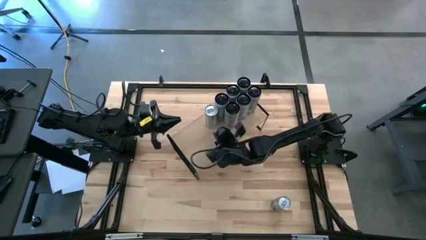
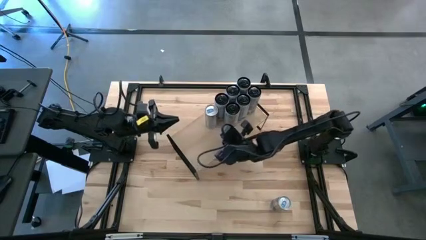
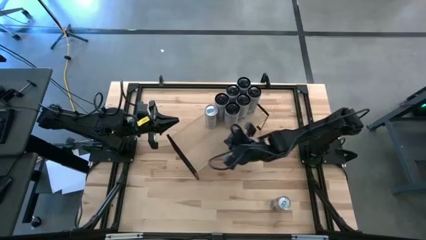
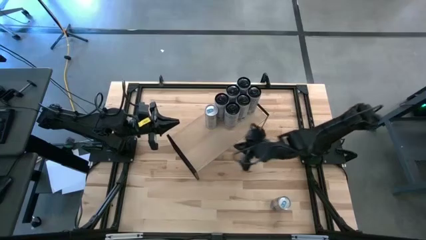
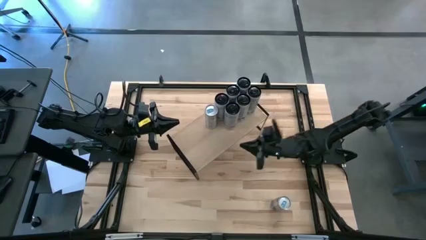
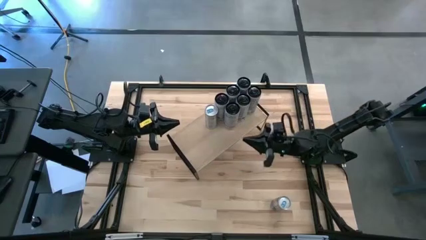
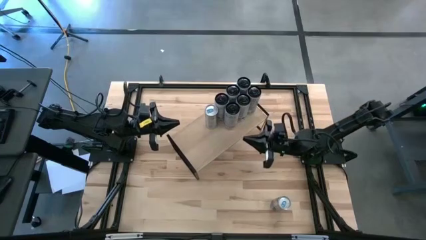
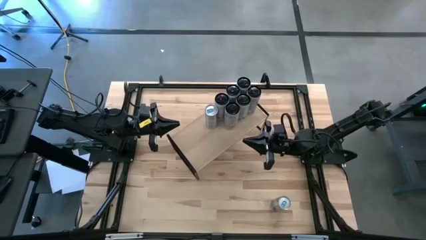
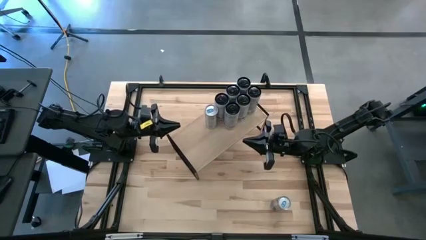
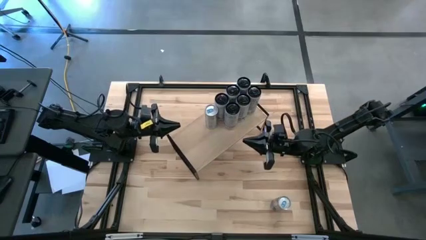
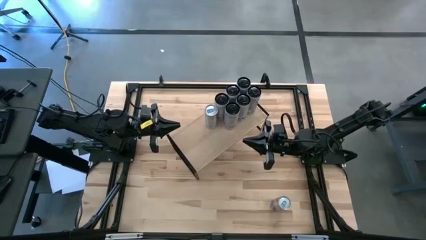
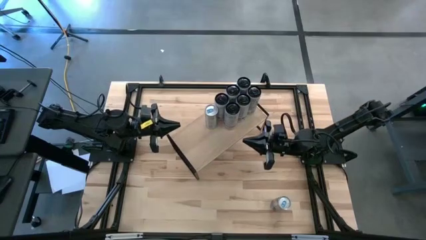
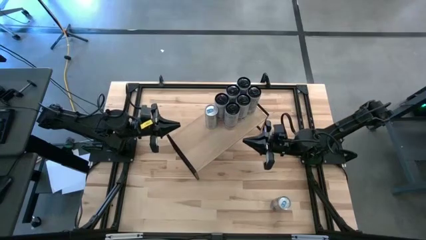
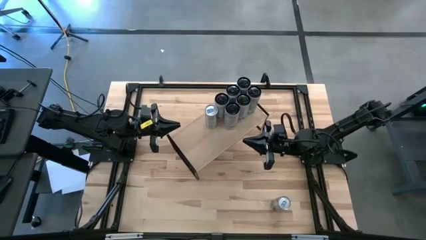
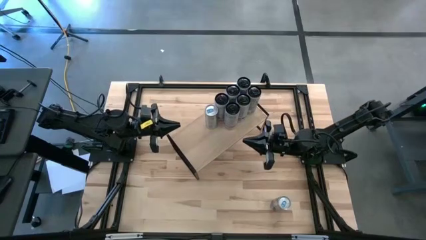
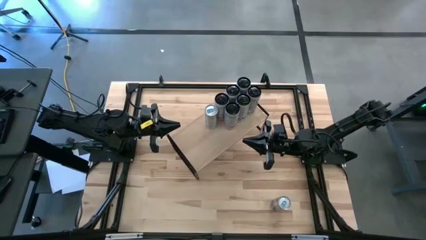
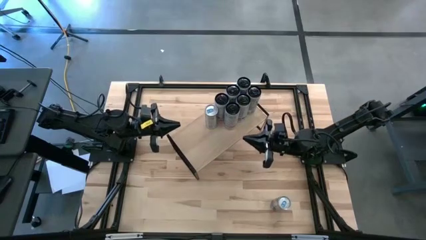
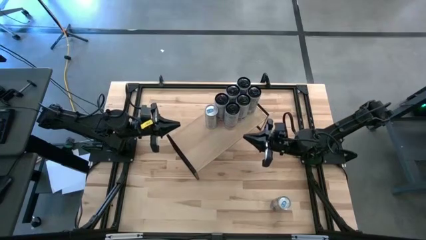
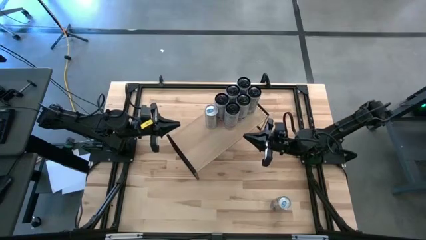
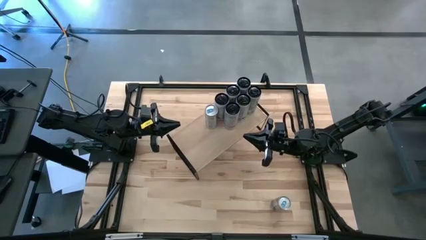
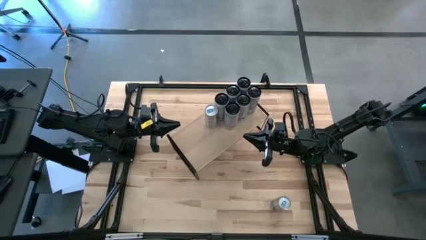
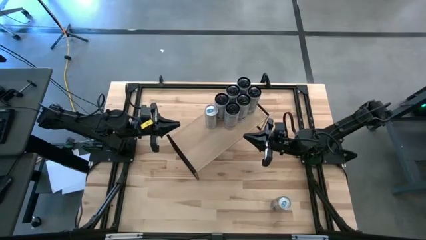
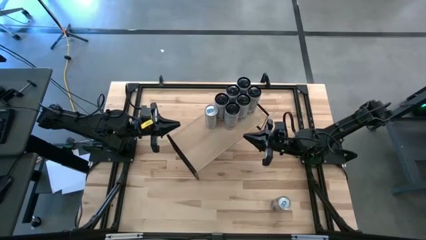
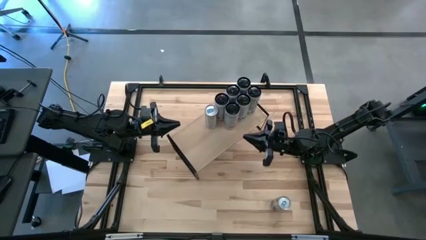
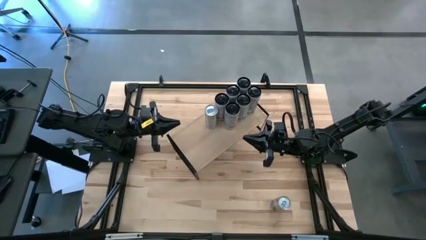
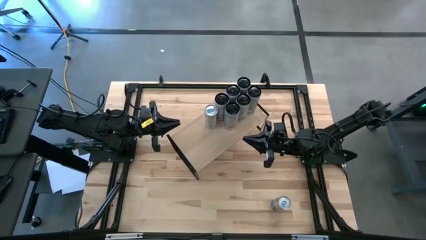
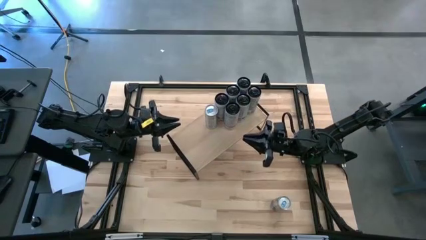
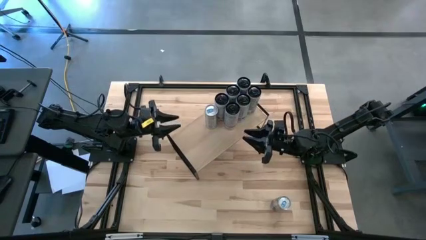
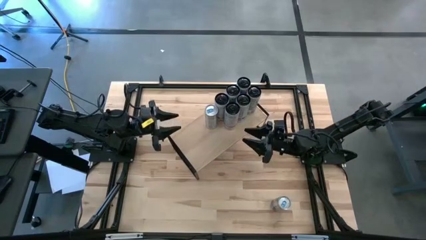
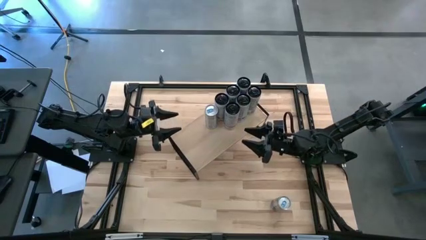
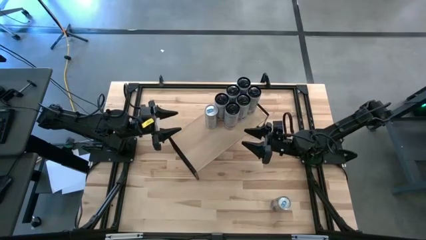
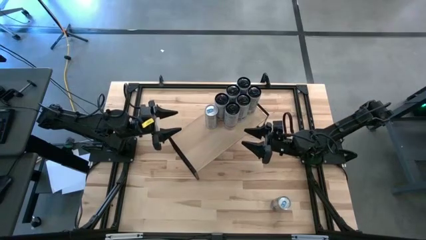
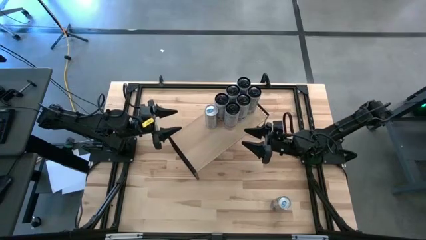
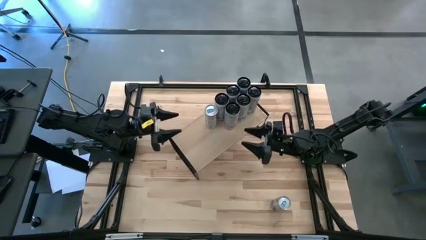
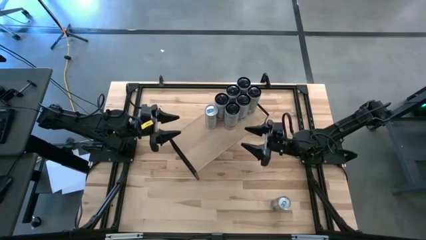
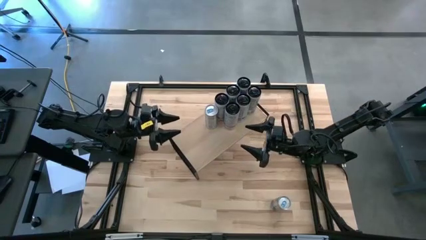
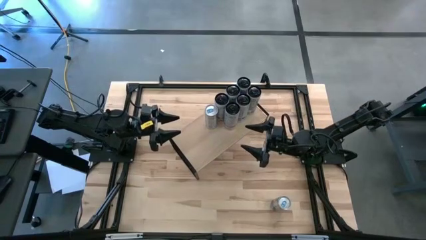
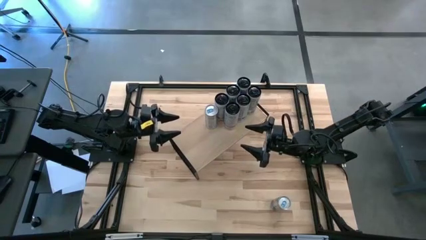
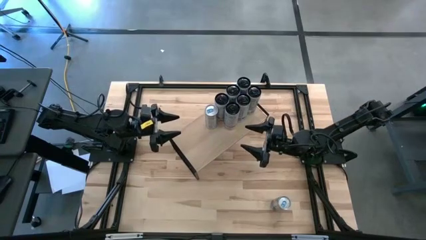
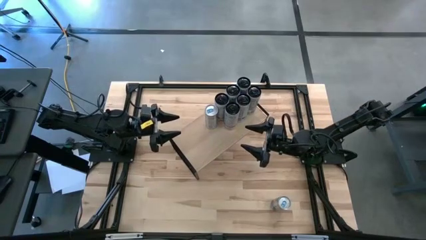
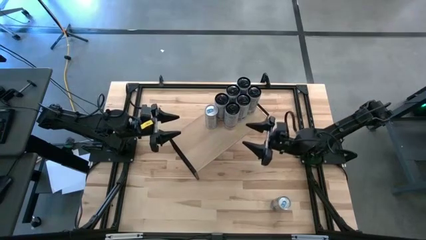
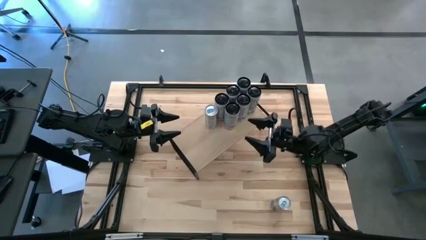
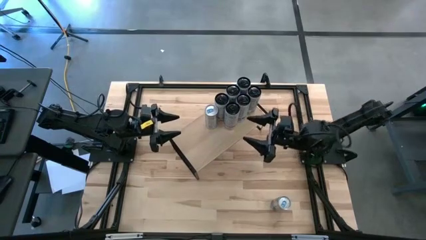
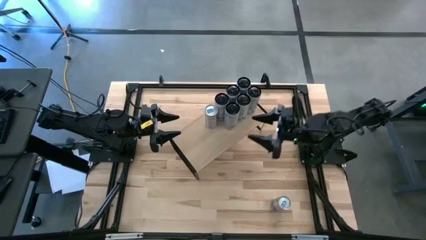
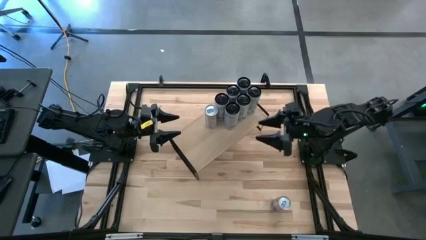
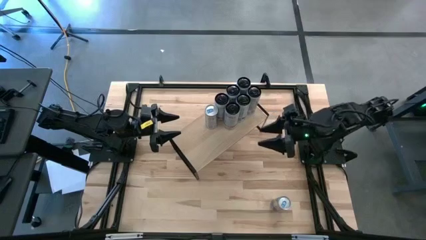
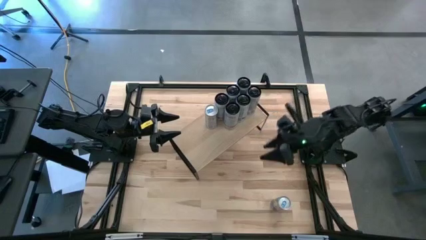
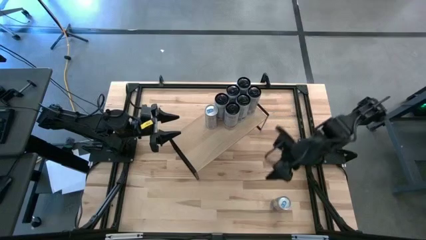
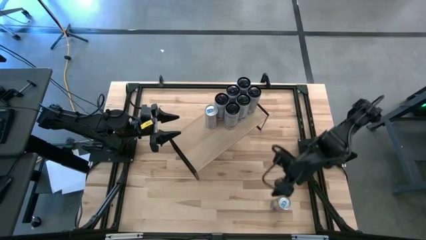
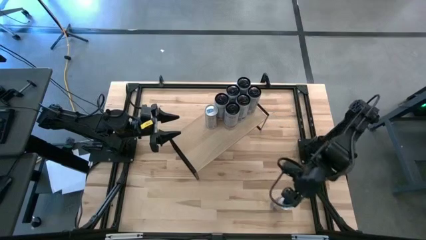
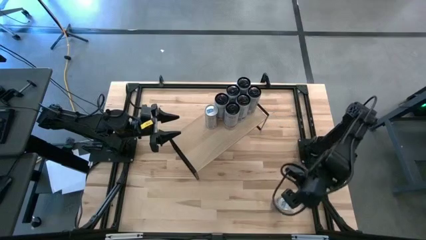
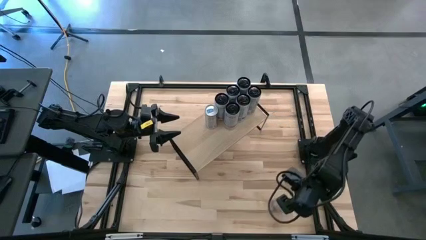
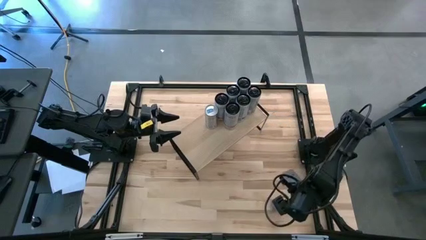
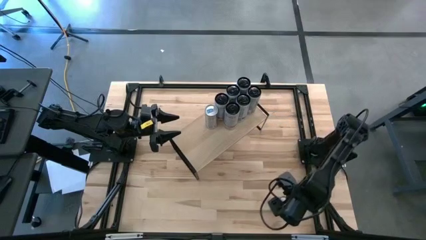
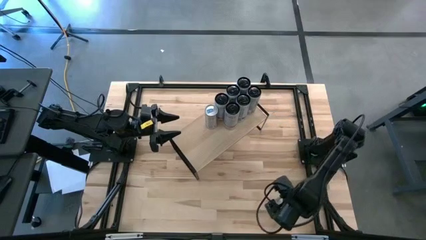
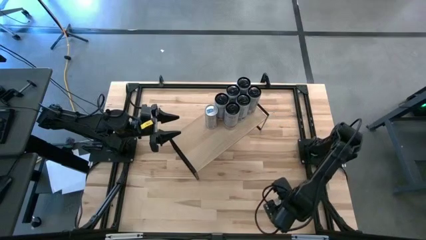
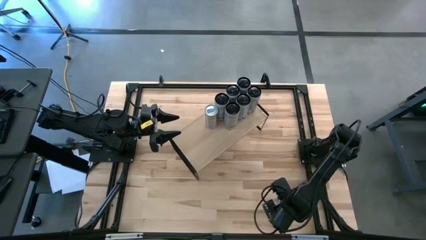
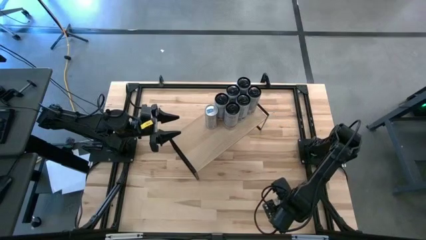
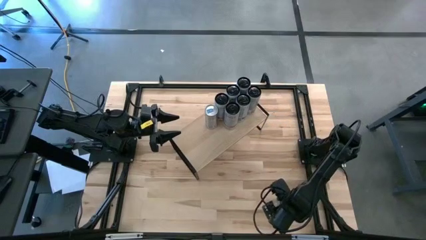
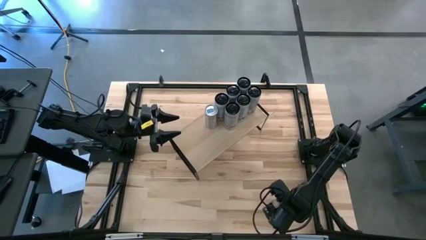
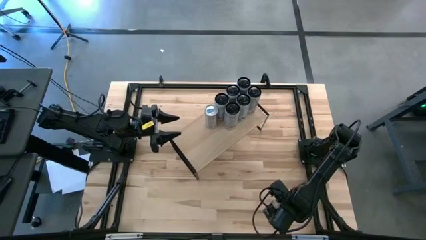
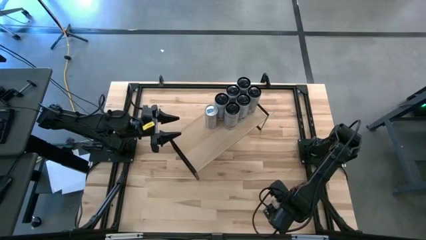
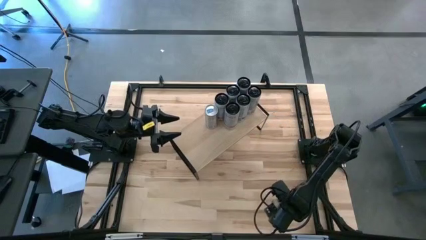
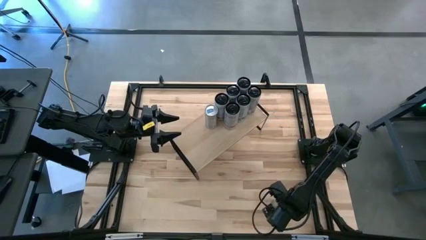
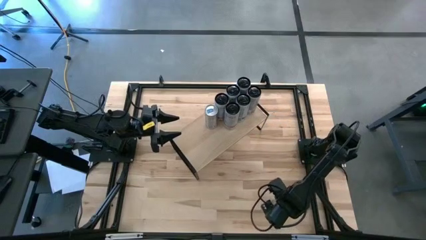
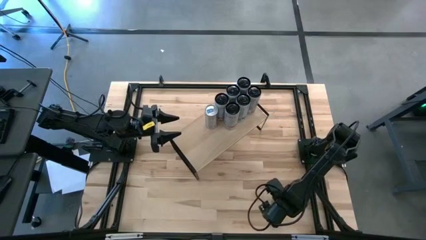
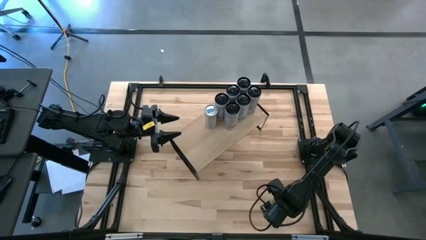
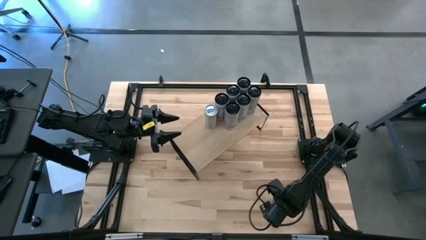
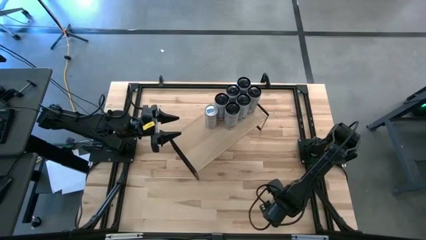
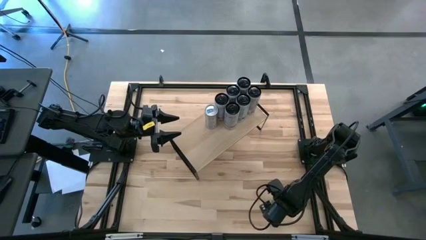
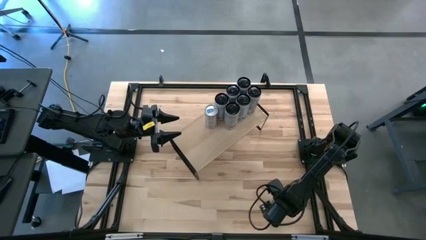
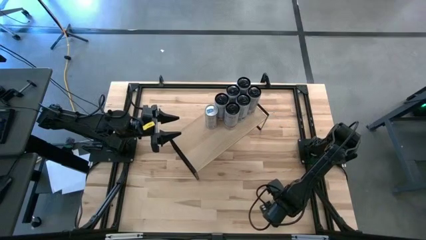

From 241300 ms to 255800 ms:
Task: Place canned beverage on shelf
Put the blue soda can on the shelf and align it with the other blue soda can
